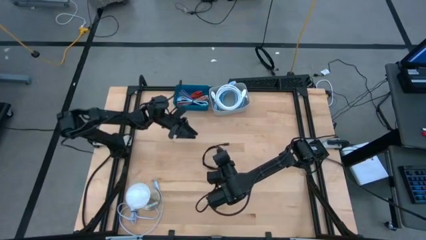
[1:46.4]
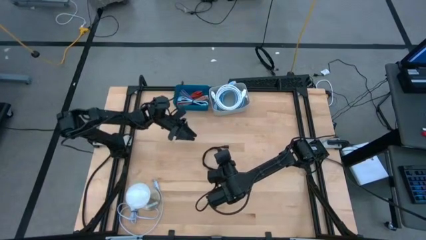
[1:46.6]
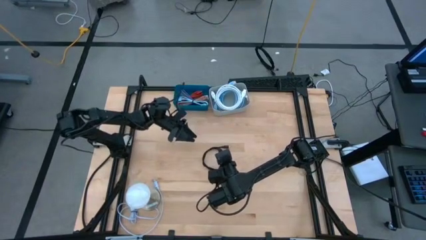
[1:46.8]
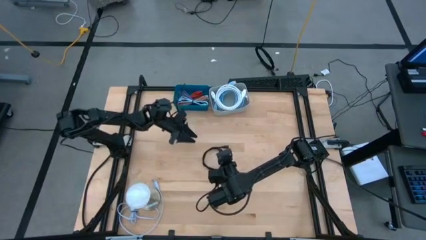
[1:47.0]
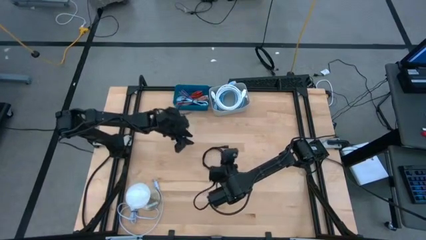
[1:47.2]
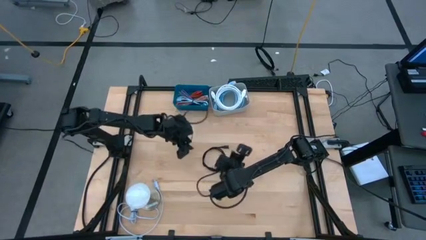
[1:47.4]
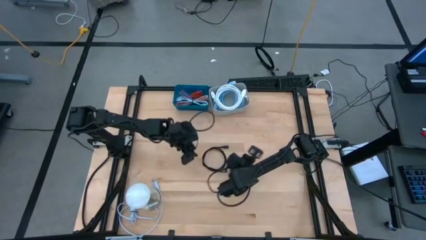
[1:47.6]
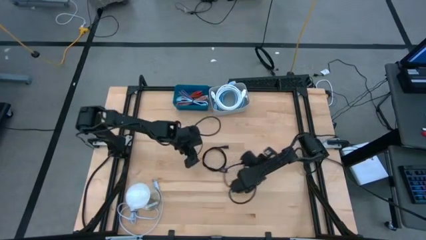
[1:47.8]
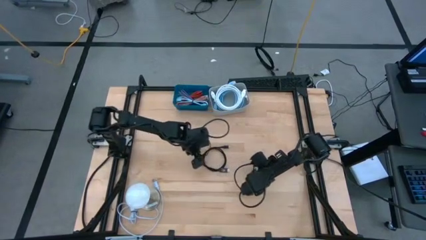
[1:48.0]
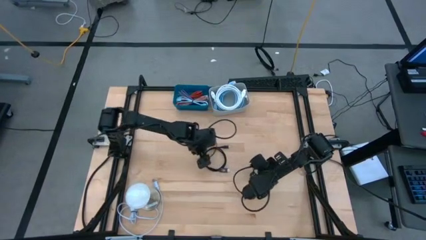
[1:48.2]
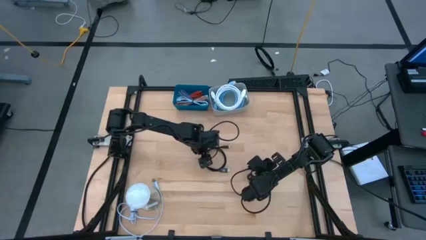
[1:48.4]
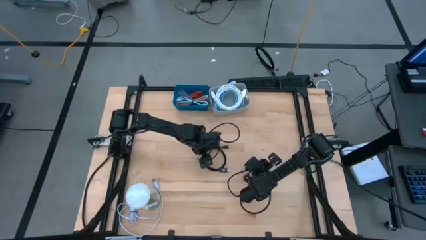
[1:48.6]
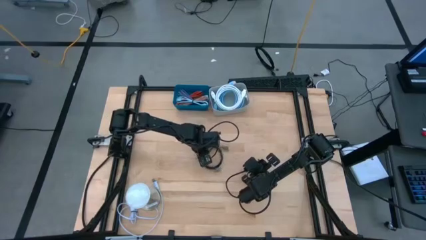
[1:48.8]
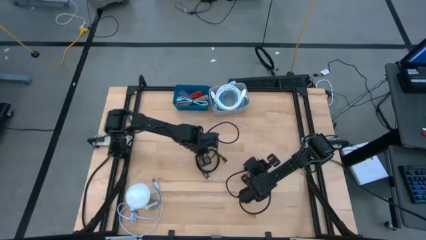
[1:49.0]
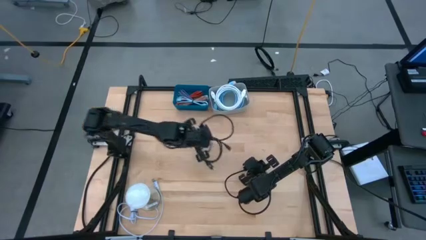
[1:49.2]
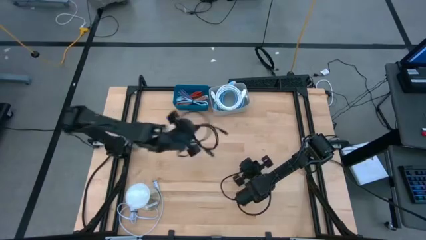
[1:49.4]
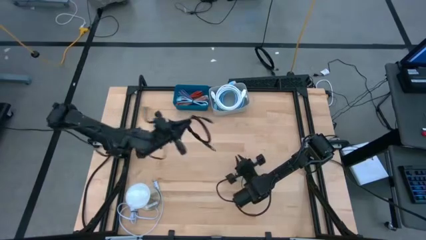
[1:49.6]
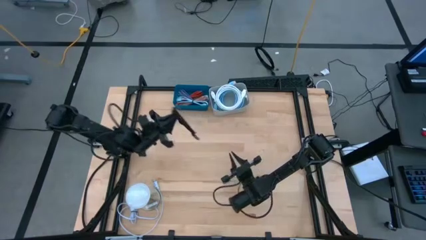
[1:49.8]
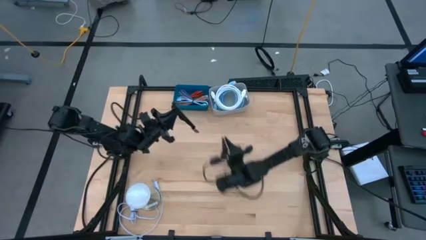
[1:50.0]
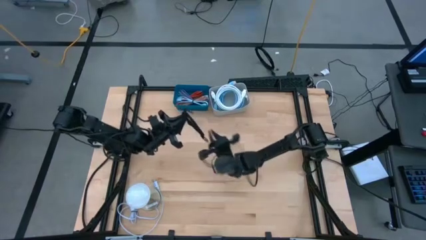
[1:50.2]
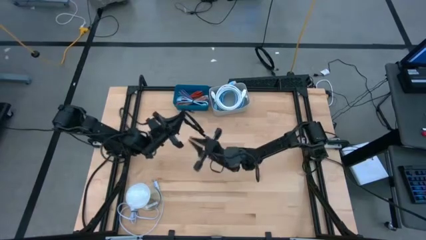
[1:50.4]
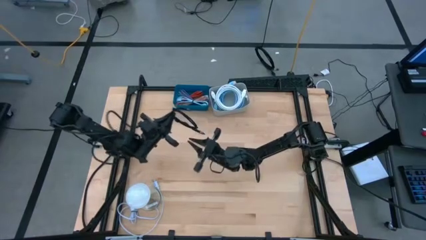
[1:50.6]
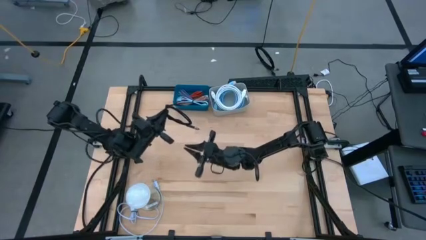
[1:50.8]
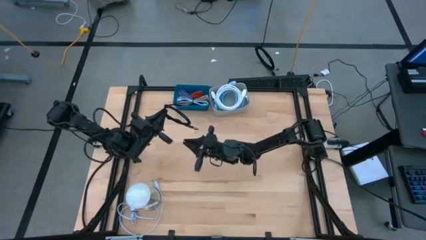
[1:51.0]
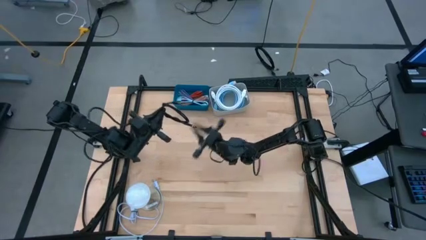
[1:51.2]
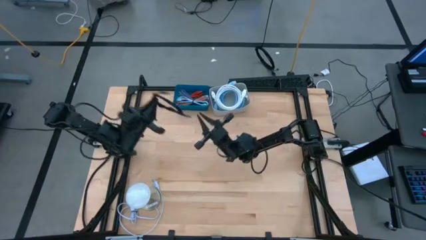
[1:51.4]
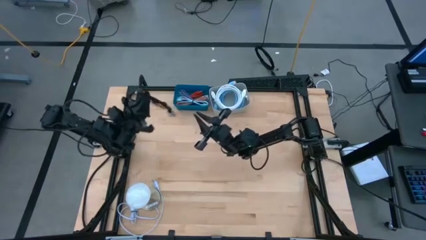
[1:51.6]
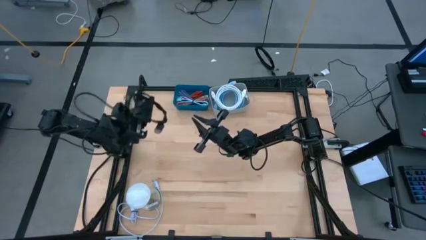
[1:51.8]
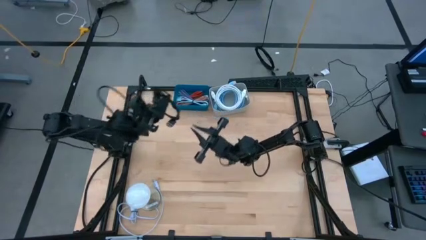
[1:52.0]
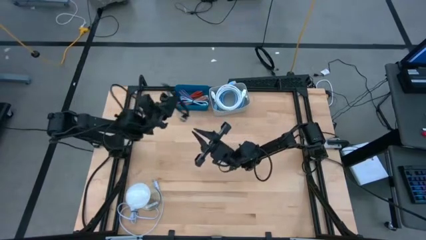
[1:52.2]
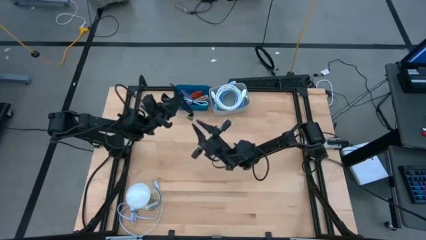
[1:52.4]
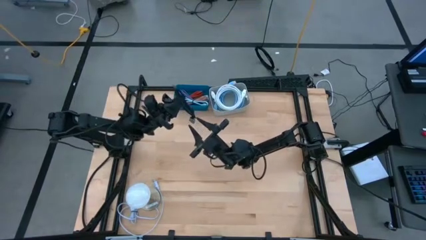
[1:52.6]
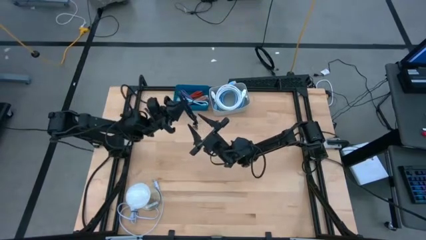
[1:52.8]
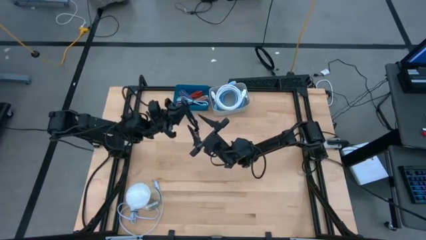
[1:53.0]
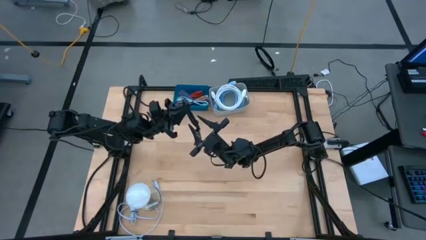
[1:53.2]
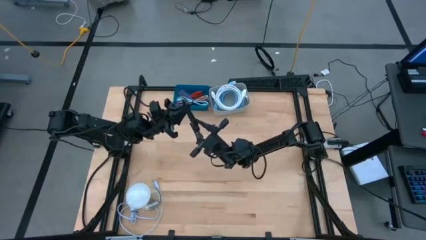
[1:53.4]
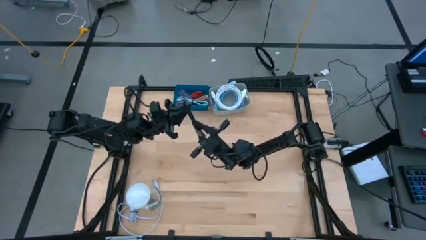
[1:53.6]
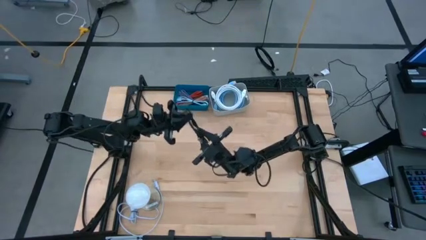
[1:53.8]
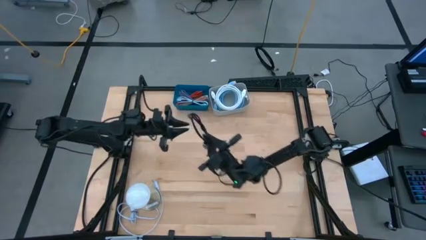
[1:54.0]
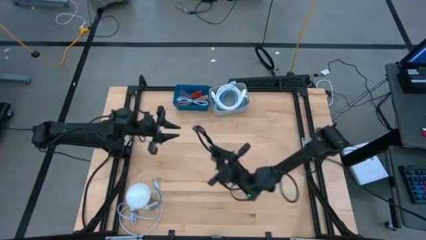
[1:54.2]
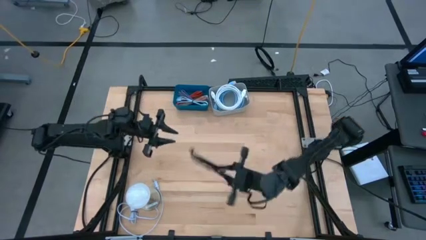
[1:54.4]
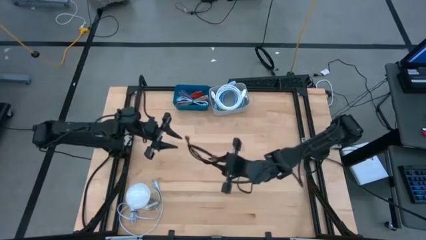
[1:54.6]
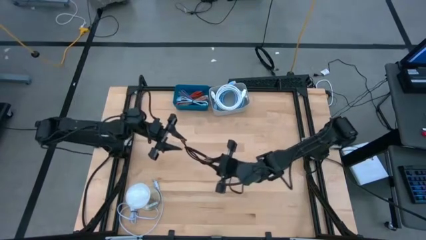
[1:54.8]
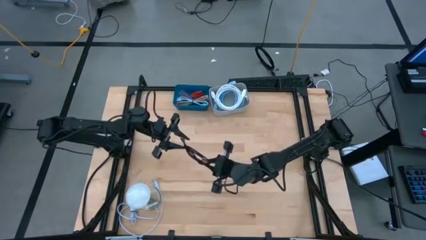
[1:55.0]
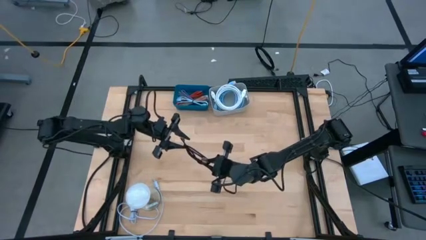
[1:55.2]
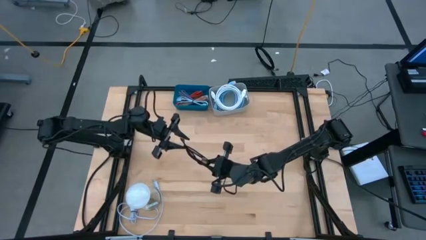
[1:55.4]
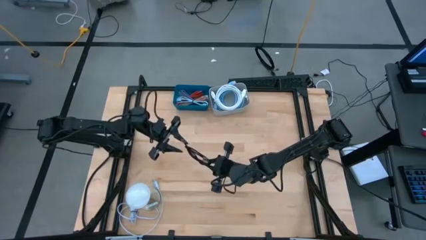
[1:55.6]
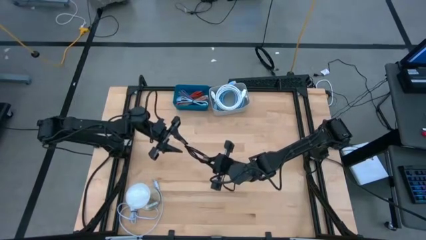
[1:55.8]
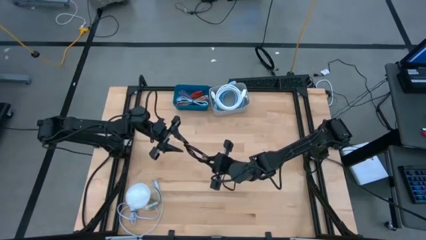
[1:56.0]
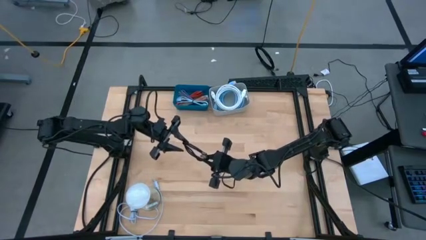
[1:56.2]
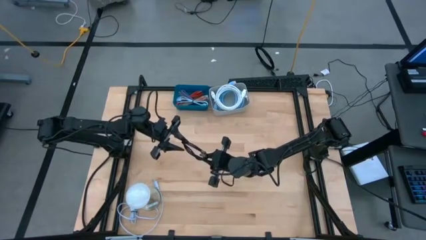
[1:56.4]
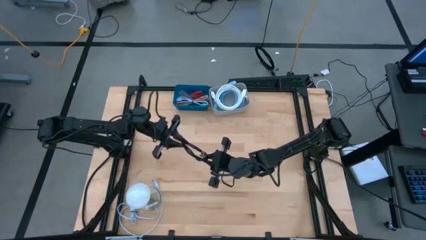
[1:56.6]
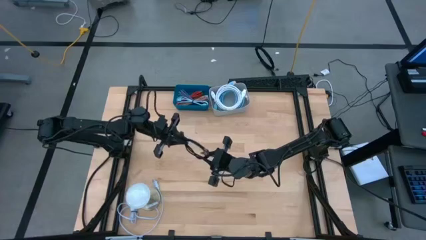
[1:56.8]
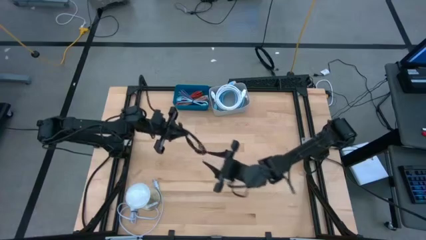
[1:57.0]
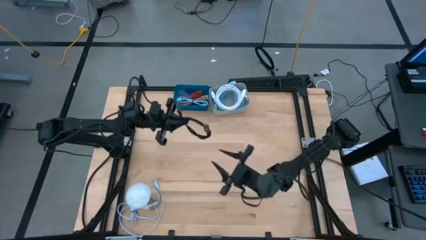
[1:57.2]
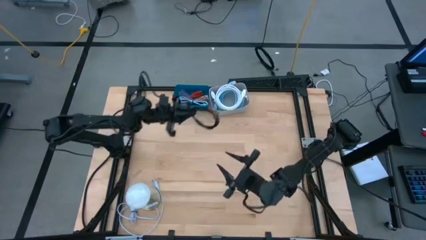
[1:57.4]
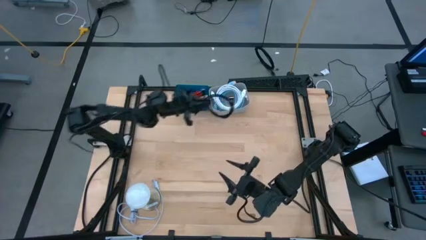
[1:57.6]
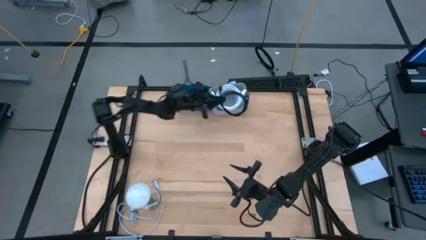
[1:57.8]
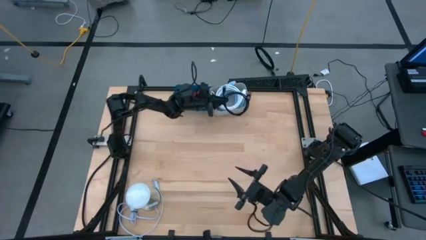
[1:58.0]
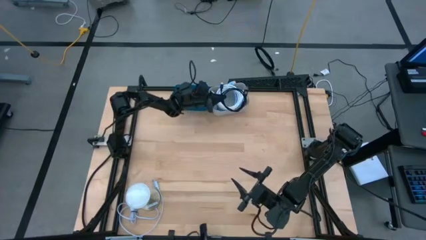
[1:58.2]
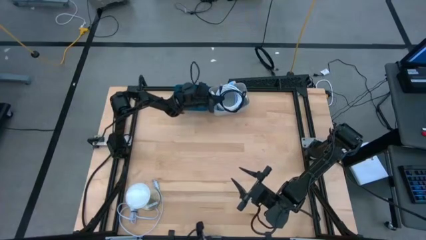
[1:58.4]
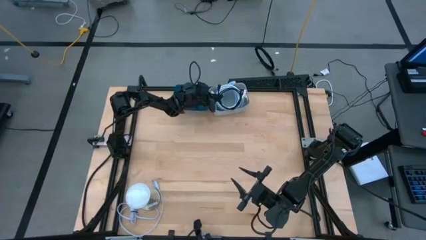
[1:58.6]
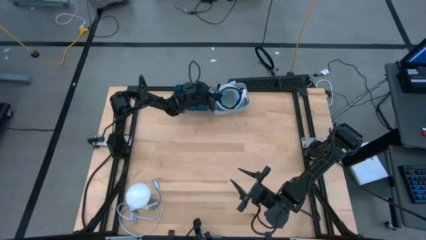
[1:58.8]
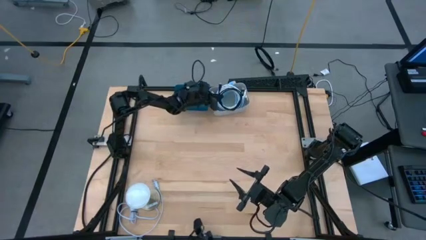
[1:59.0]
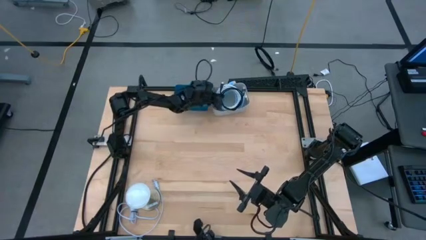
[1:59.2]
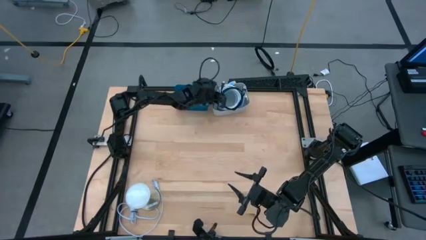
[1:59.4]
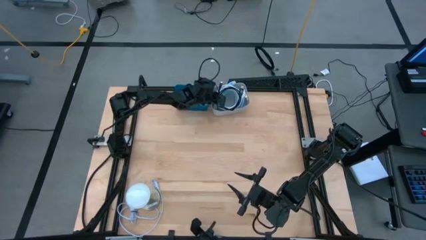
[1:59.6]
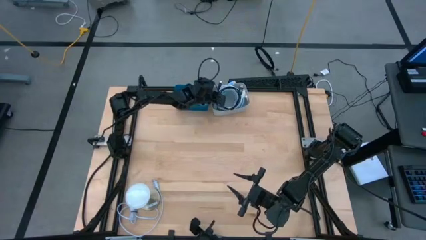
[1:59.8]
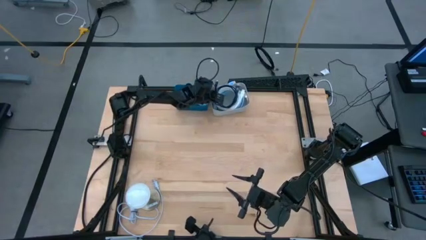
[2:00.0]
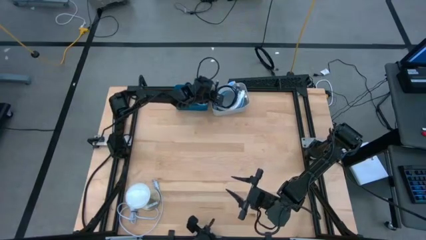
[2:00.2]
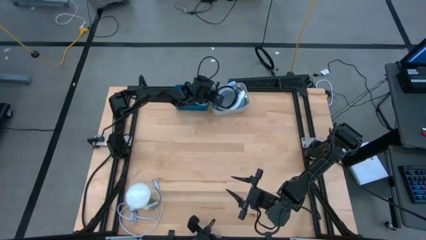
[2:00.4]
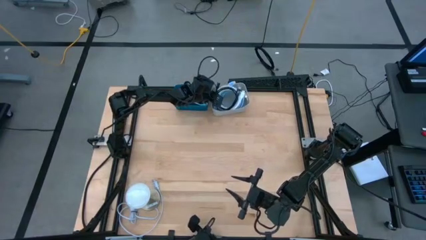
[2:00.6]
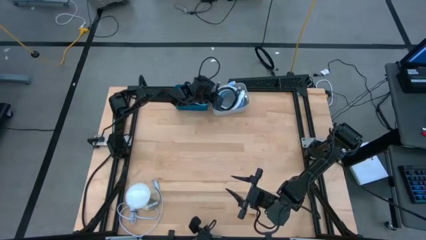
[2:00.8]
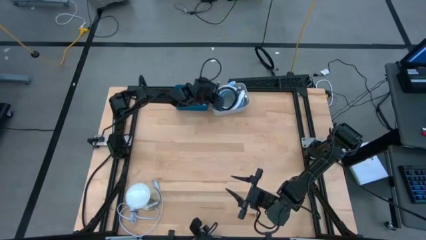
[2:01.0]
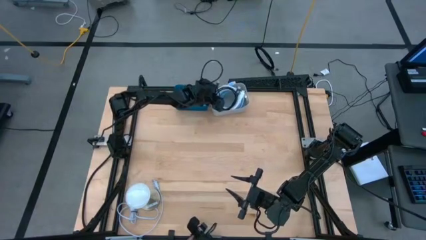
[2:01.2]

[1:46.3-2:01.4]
Task: Pick & Place USB Port
Put the black usb cable into the gray bin

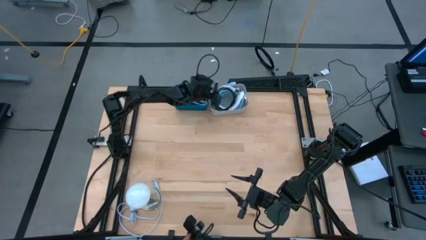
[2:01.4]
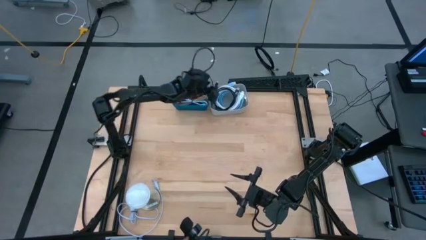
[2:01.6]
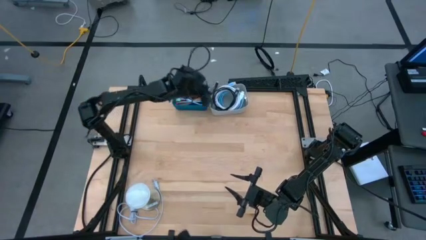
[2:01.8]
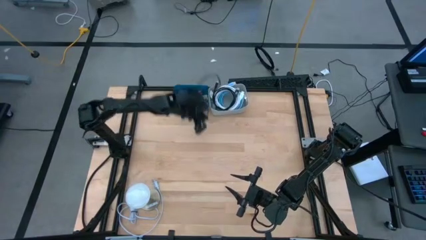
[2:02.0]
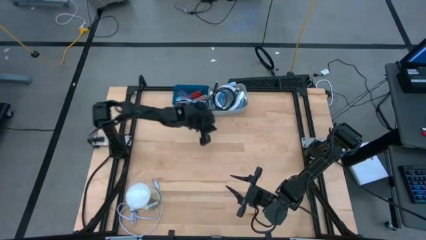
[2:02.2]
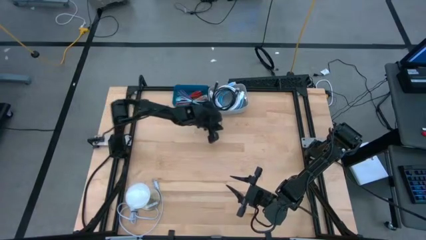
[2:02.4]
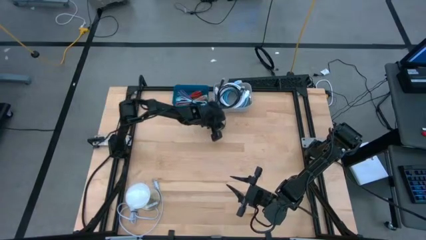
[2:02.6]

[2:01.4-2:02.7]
Adjust the gray bin on the table
